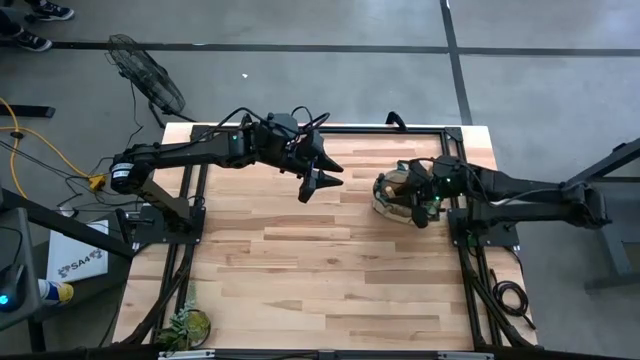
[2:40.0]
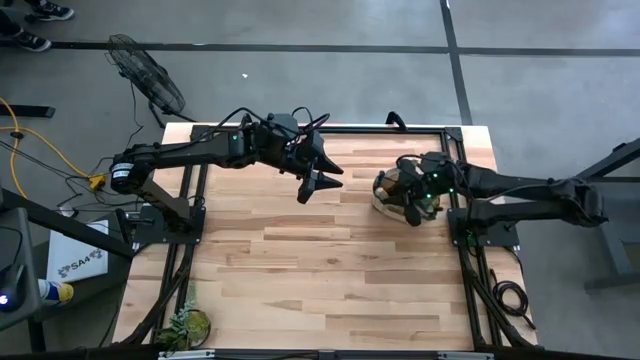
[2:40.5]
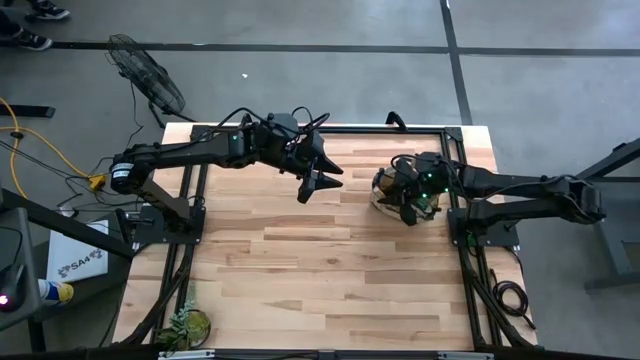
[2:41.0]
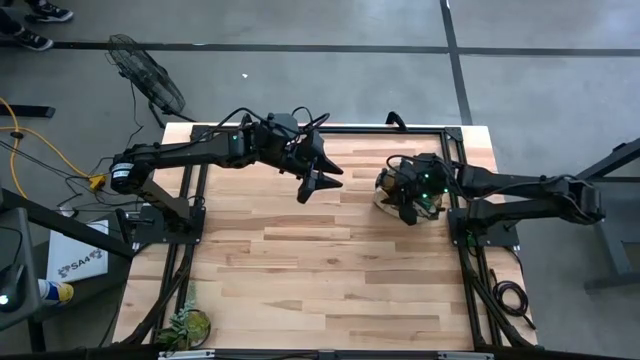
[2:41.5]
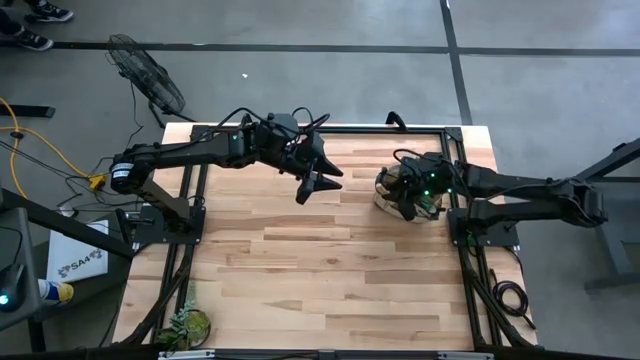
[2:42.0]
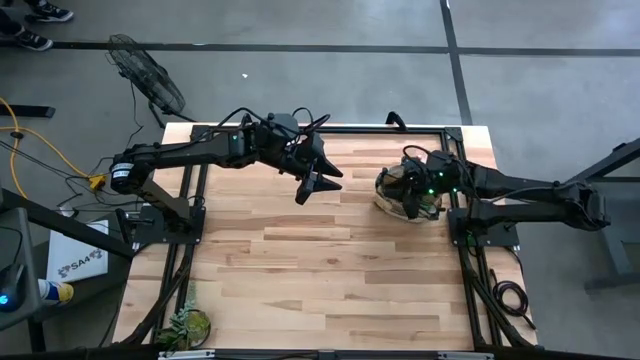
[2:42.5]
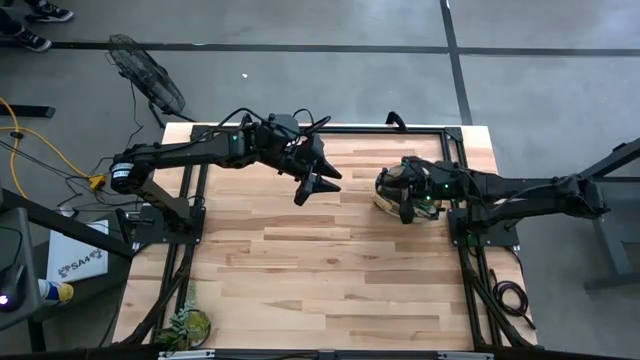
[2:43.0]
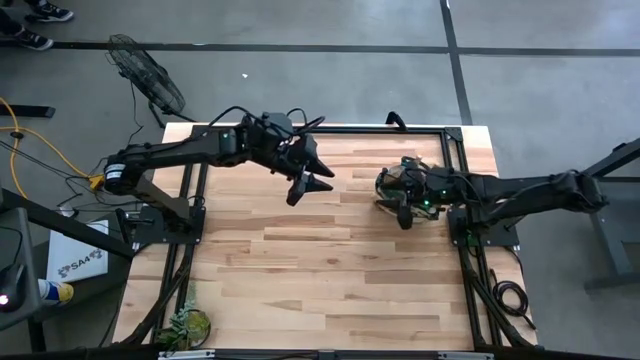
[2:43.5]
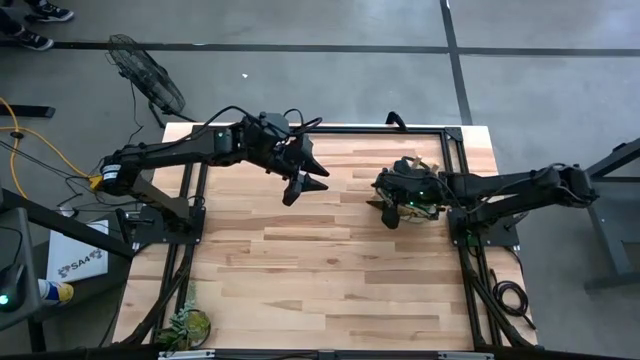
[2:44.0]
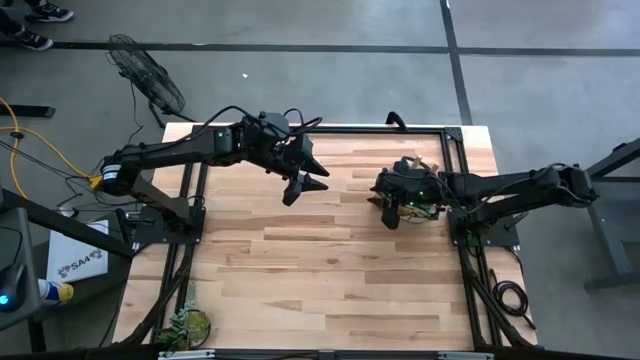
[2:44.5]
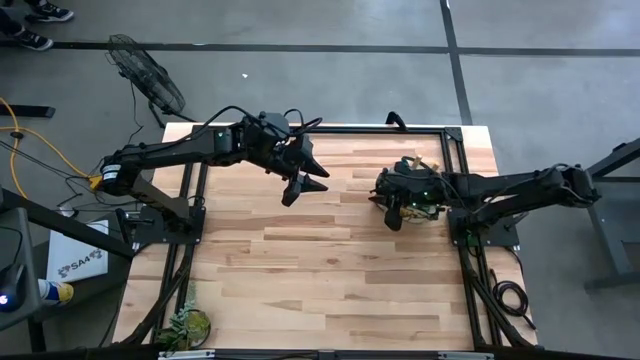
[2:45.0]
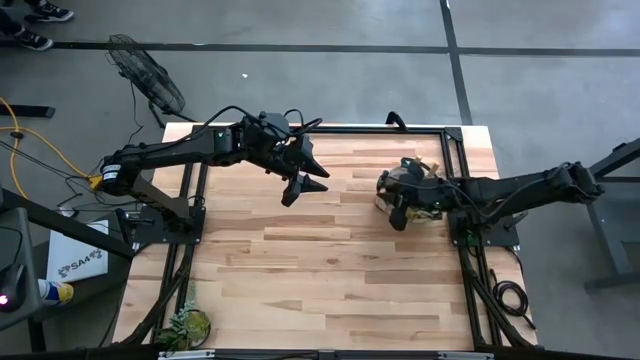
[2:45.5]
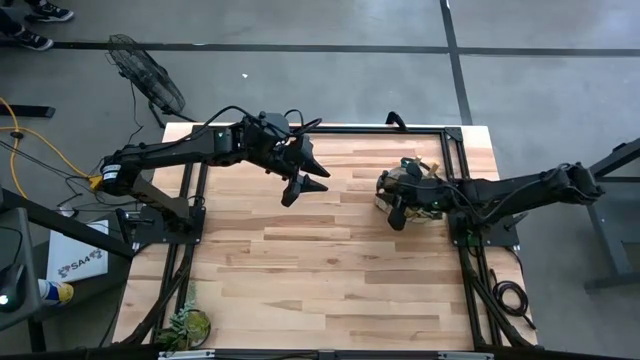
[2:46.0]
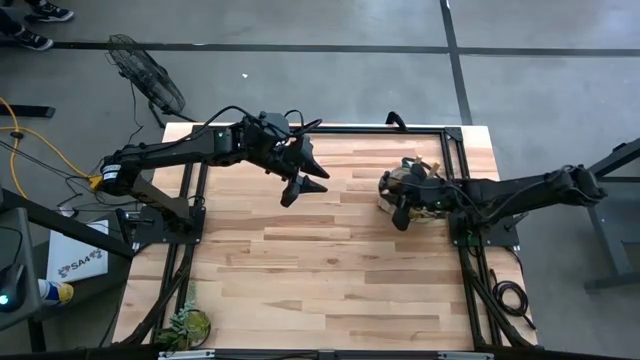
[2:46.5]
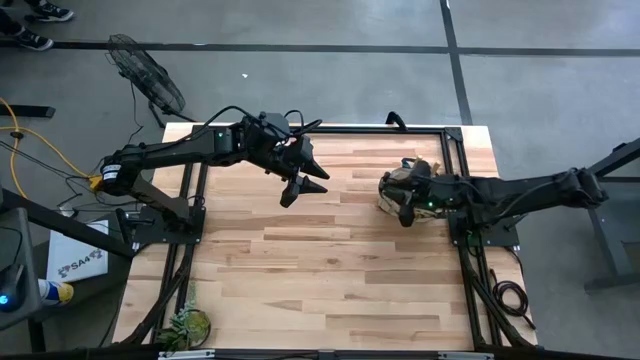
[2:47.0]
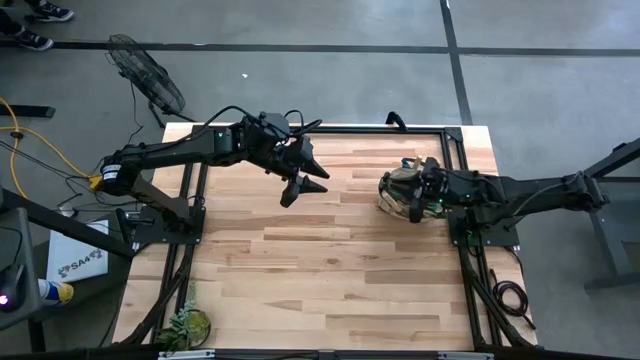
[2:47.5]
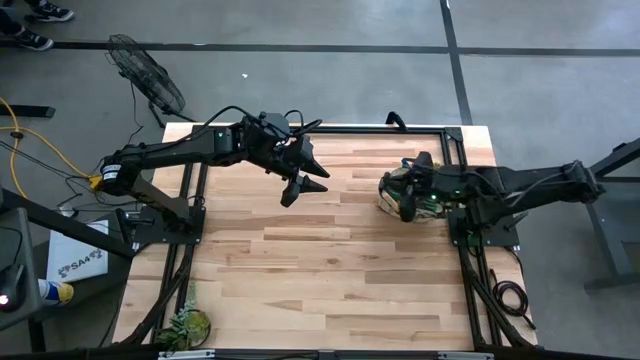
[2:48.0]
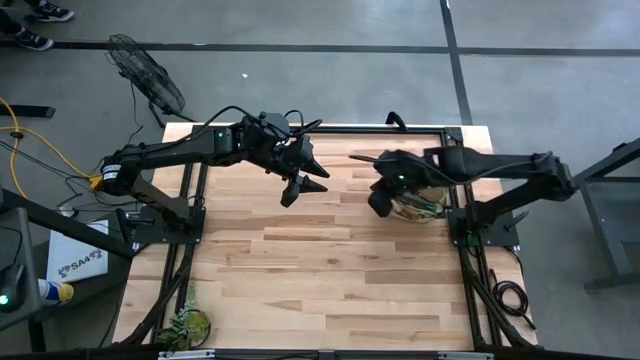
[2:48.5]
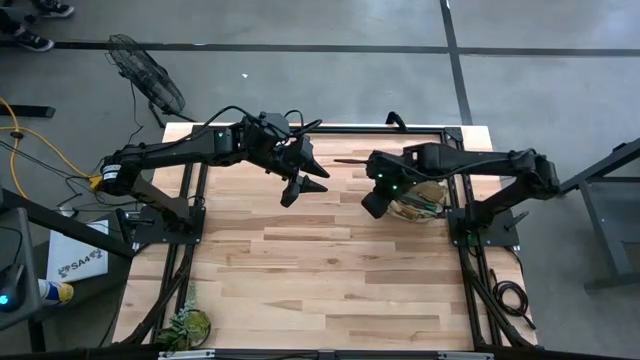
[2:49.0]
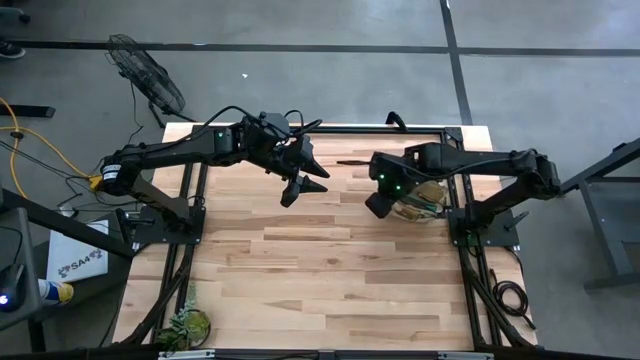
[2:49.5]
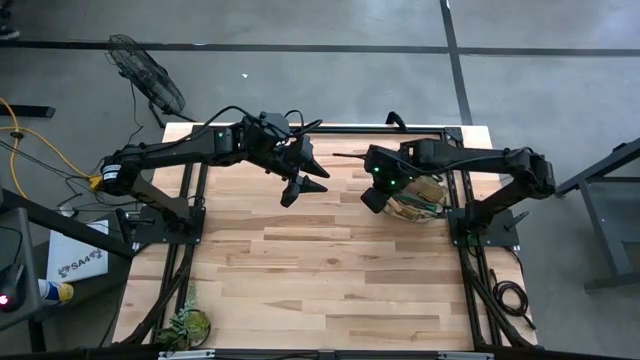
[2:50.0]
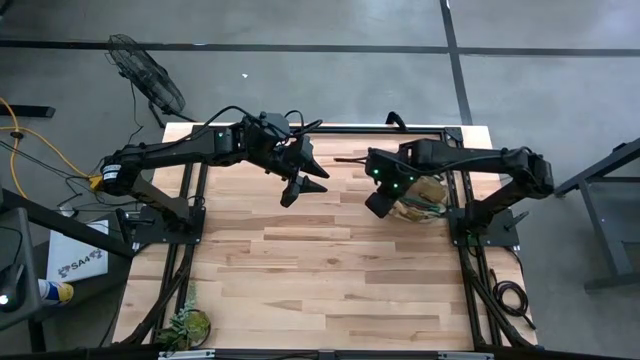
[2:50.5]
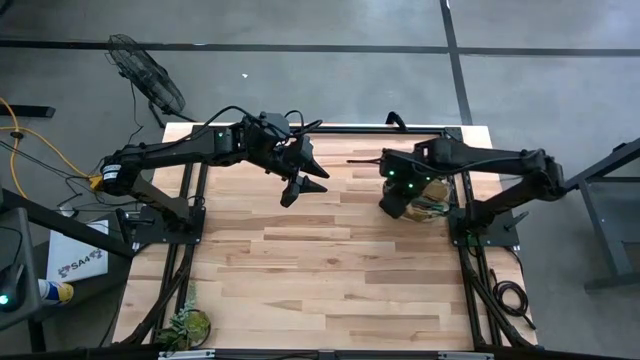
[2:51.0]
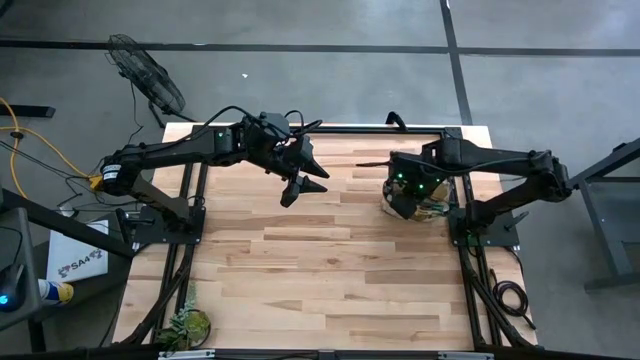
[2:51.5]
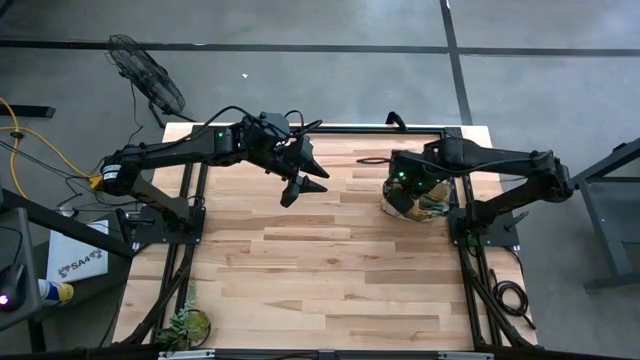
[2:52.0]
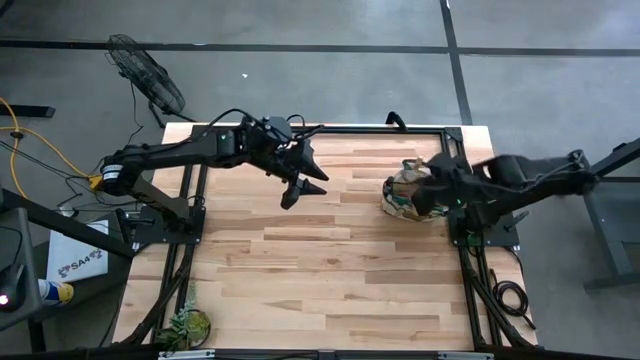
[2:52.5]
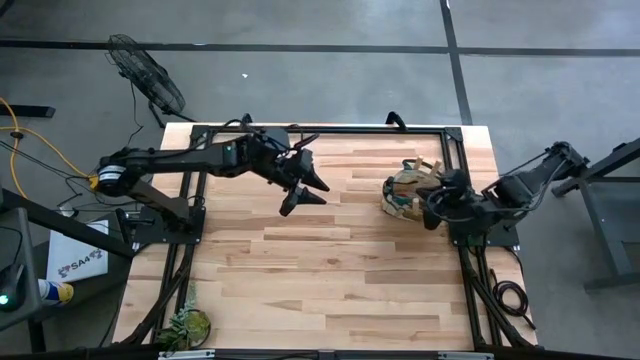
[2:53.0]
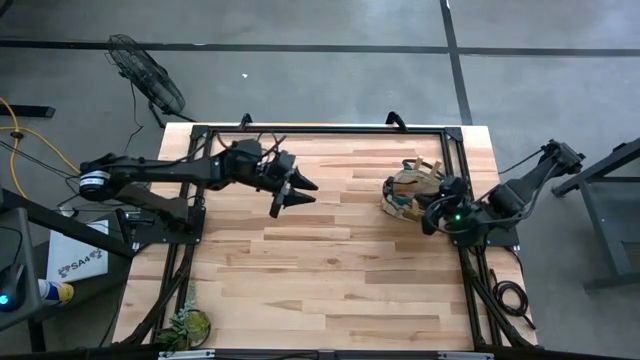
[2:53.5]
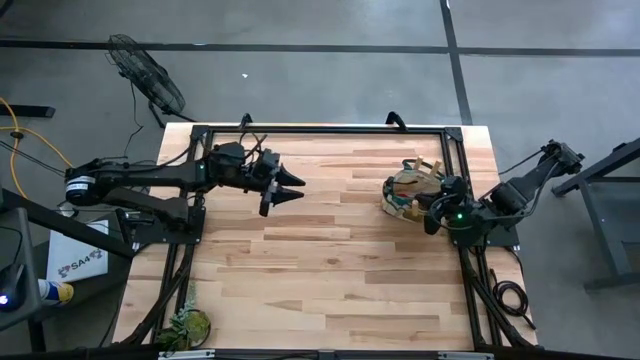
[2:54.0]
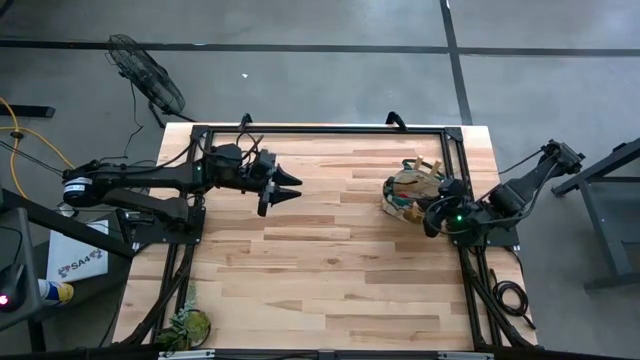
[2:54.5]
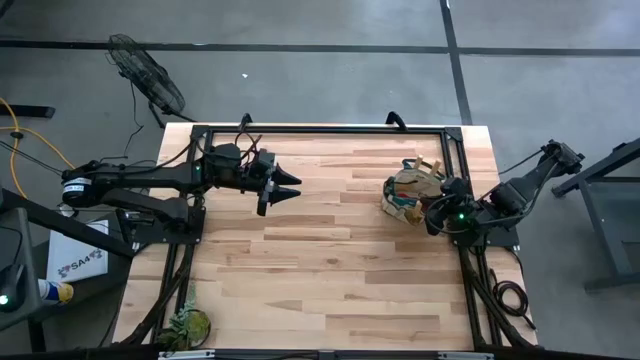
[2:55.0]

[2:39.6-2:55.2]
Task: Pick & Place Garden tools in Gardening bag
Put the hand rake into the gardening bag

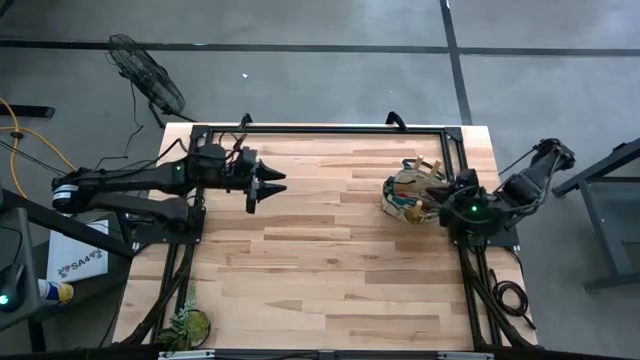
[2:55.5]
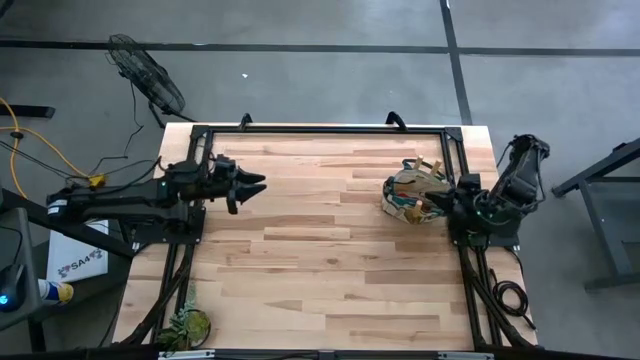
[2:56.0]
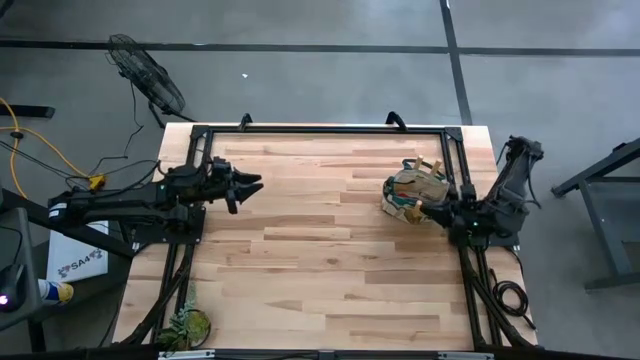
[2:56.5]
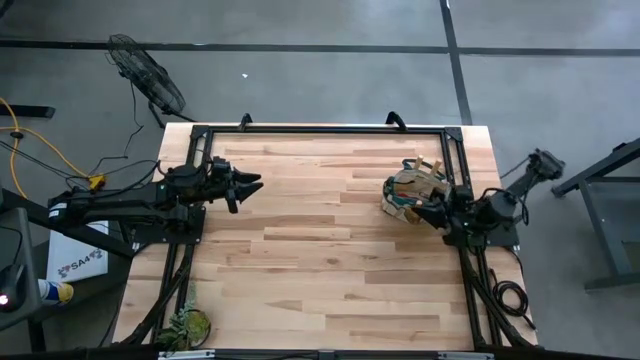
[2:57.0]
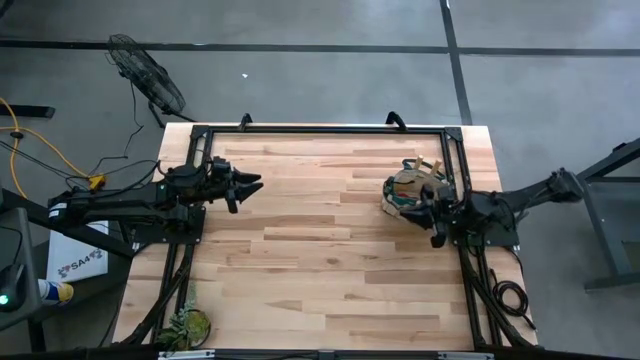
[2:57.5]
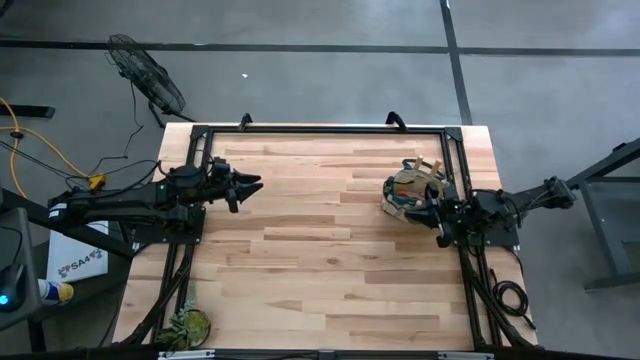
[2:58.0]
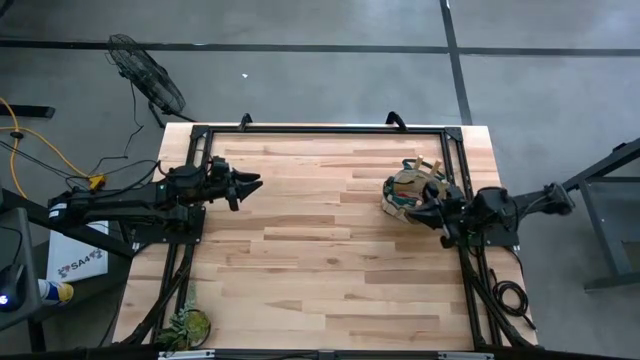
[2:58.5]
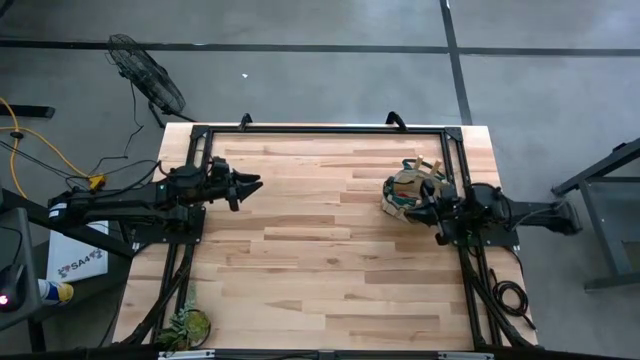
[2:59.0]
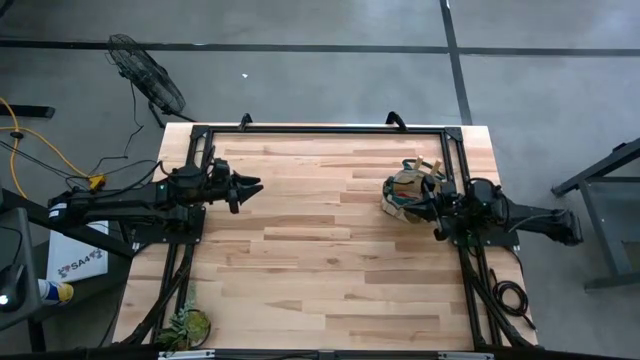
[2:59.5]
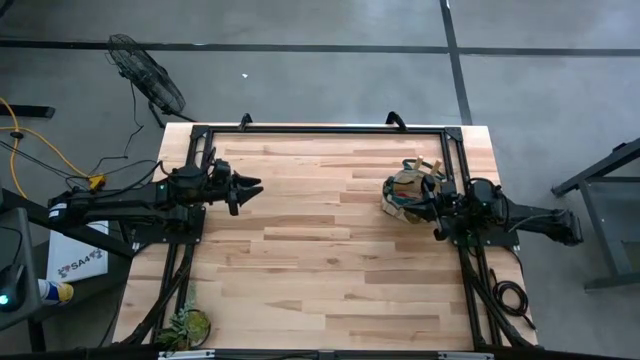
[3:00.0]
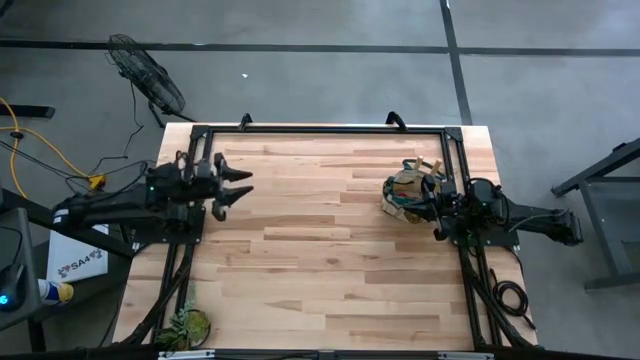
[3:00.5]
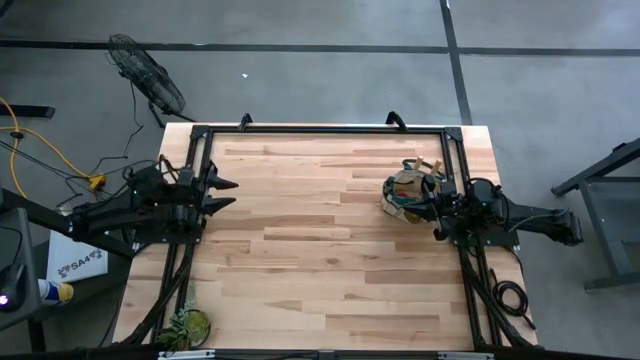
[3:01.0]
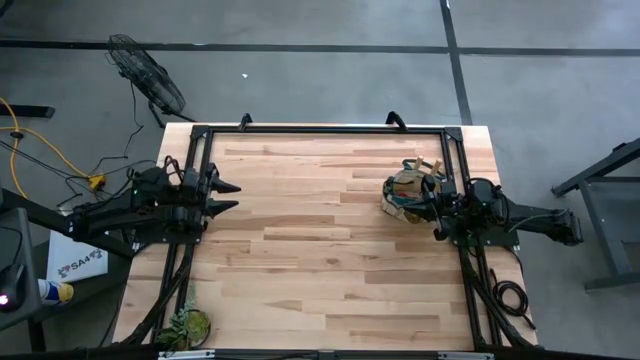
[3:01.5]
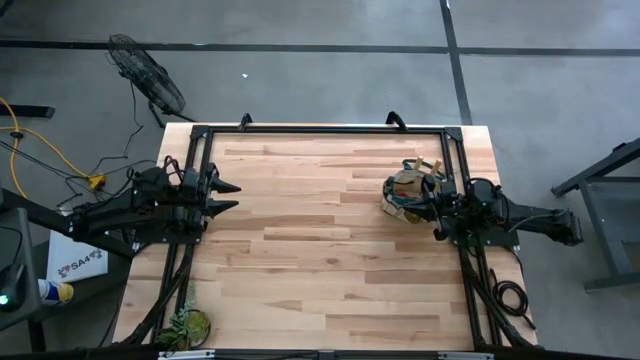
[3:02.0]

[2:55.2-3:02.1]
Return to Home Position

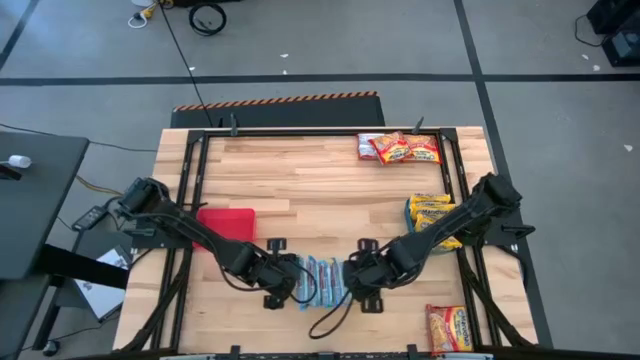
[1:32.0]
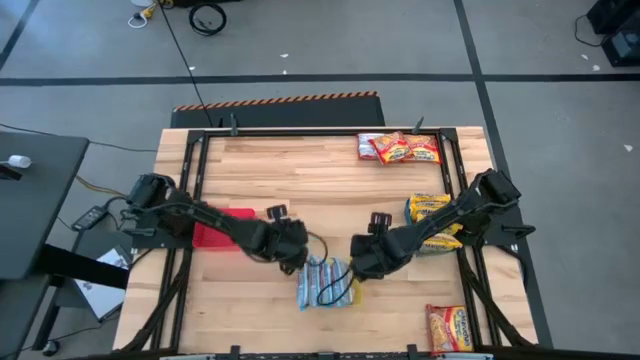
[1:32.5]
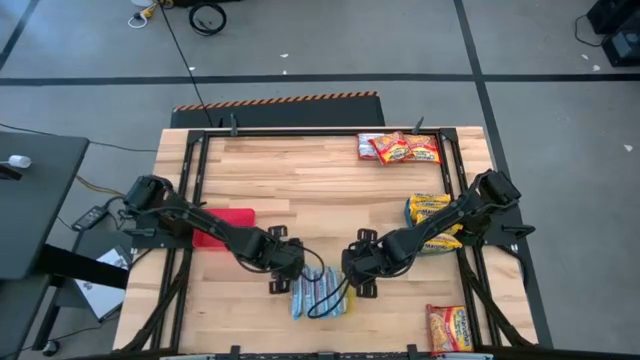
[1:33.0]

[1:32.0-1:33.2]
Task: Sort Maruchan noodles
Adjust the yellow bin
